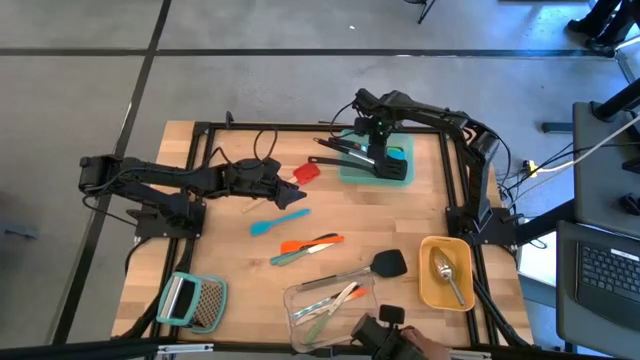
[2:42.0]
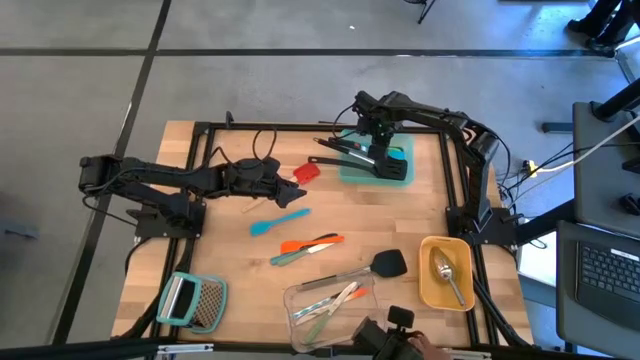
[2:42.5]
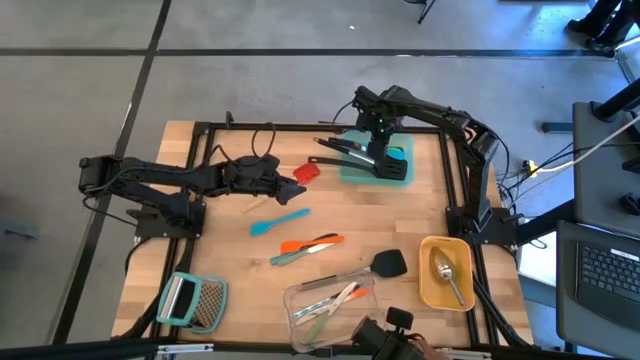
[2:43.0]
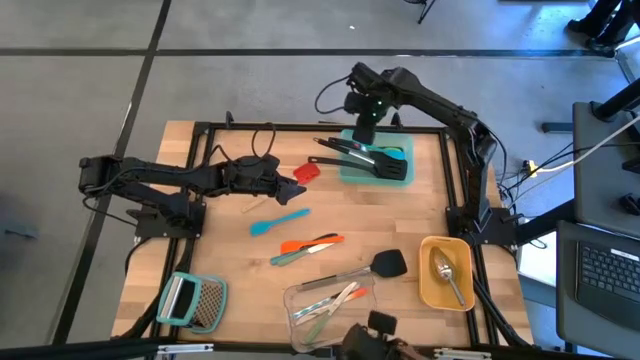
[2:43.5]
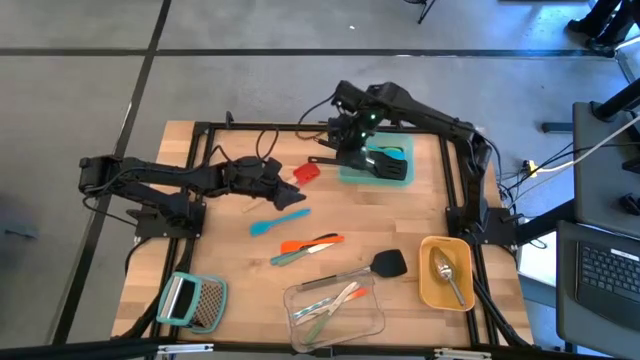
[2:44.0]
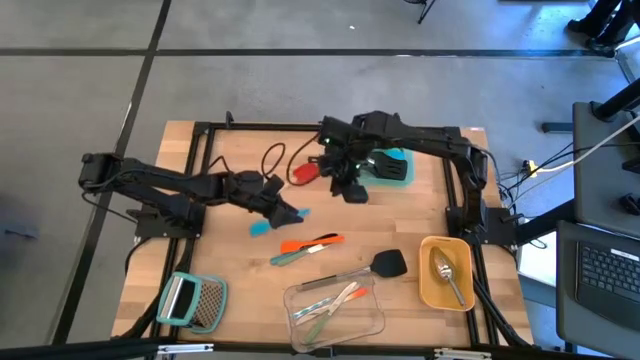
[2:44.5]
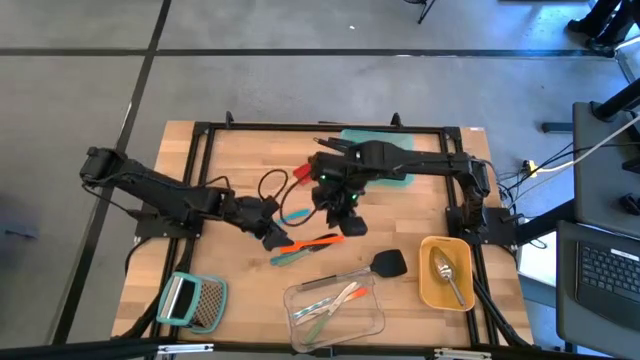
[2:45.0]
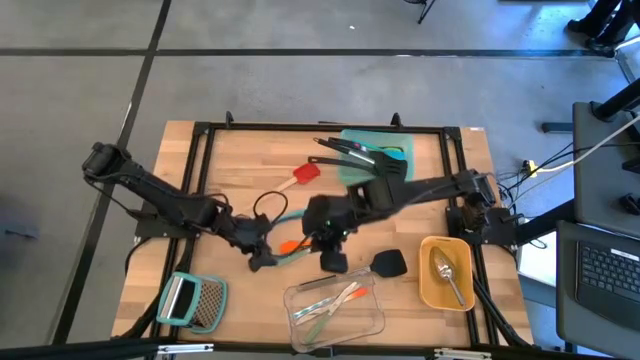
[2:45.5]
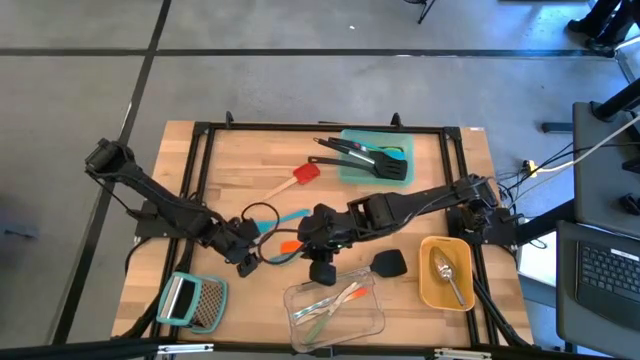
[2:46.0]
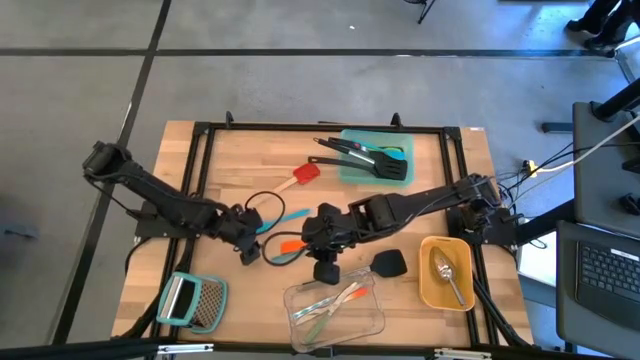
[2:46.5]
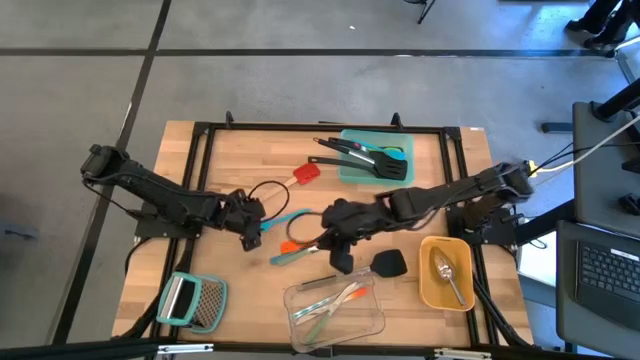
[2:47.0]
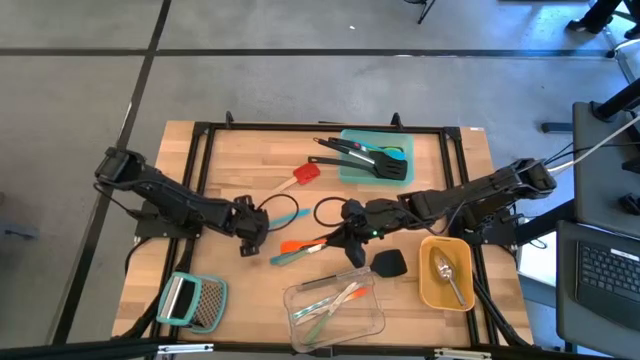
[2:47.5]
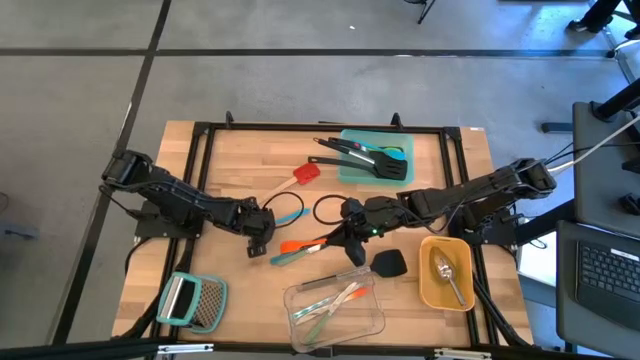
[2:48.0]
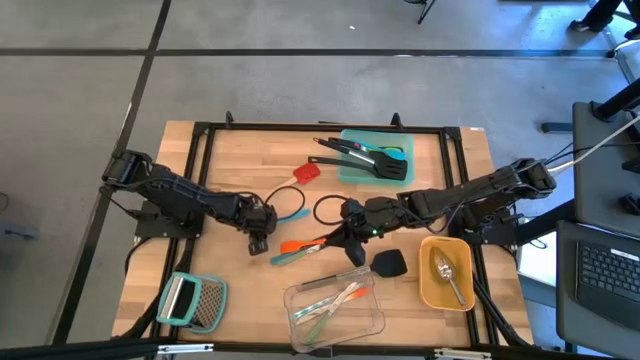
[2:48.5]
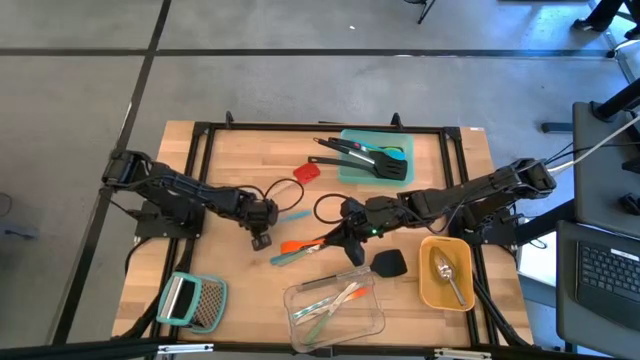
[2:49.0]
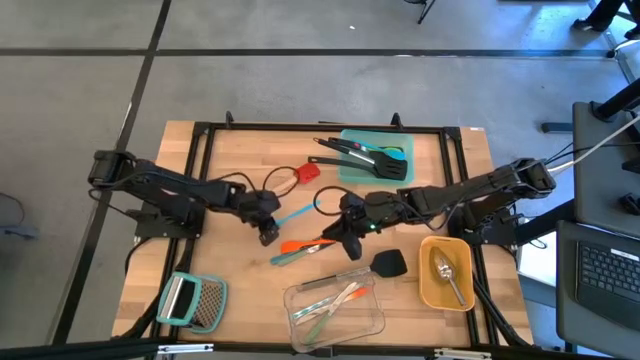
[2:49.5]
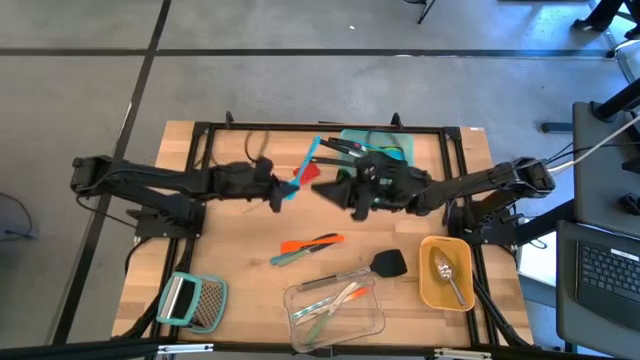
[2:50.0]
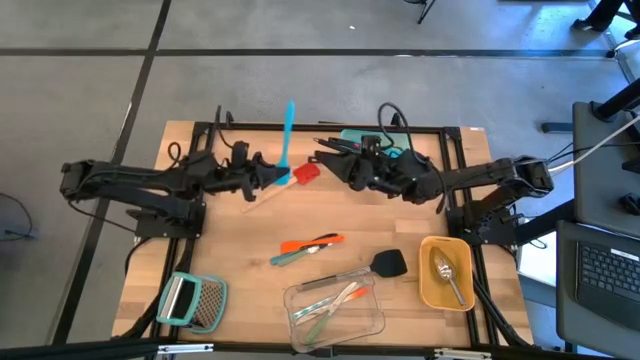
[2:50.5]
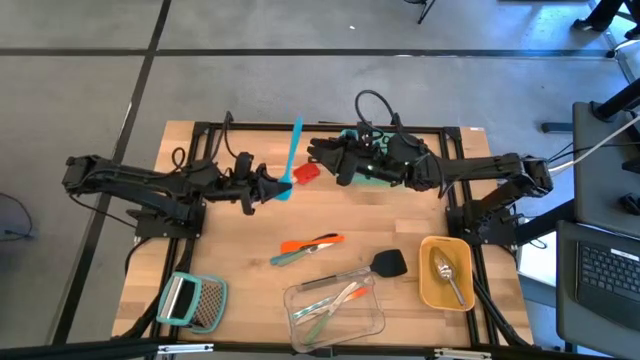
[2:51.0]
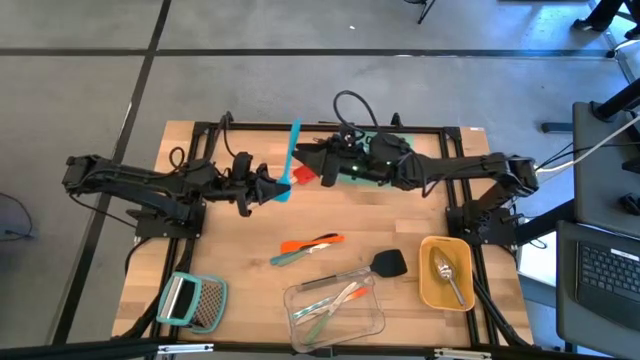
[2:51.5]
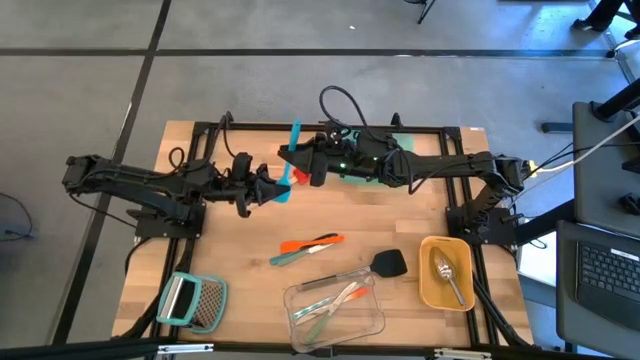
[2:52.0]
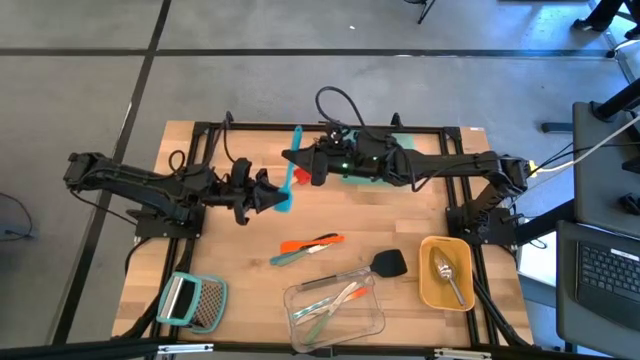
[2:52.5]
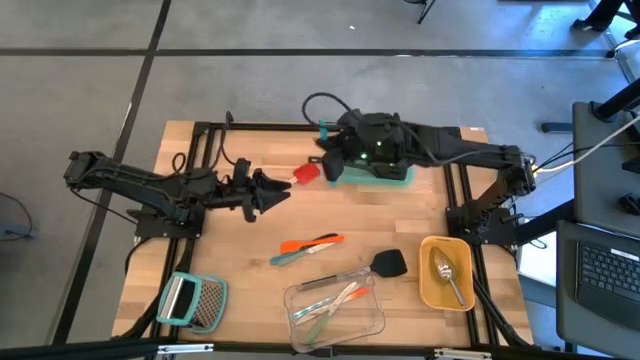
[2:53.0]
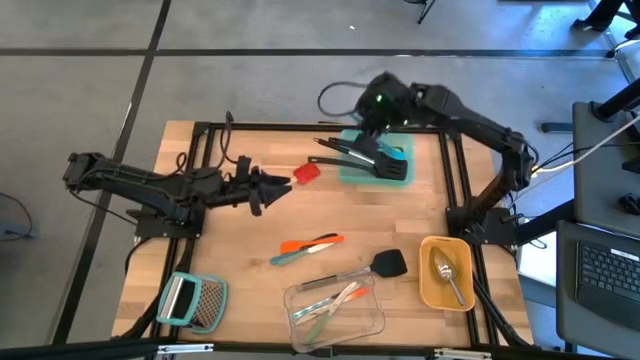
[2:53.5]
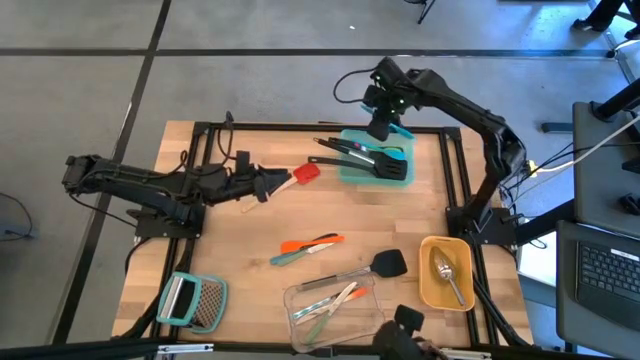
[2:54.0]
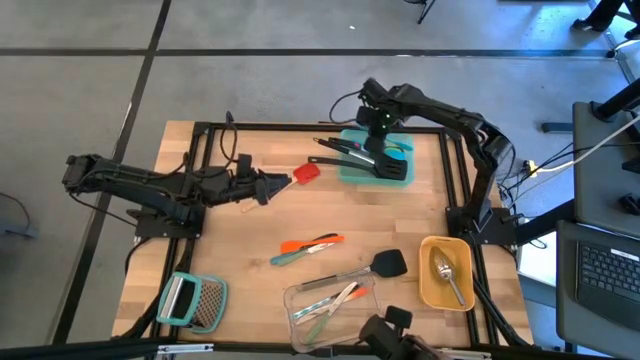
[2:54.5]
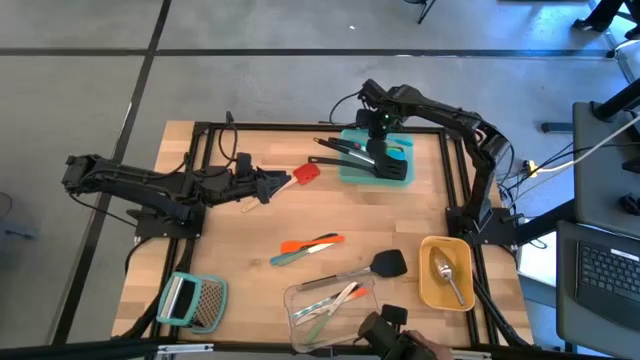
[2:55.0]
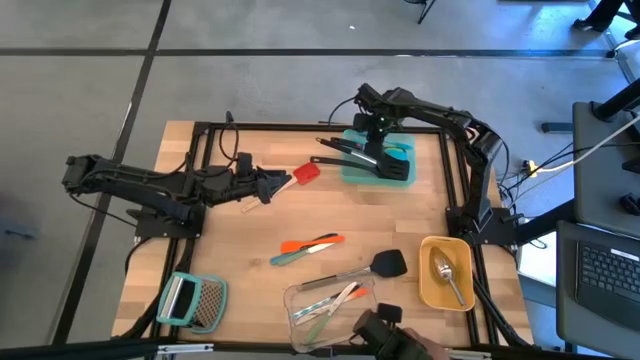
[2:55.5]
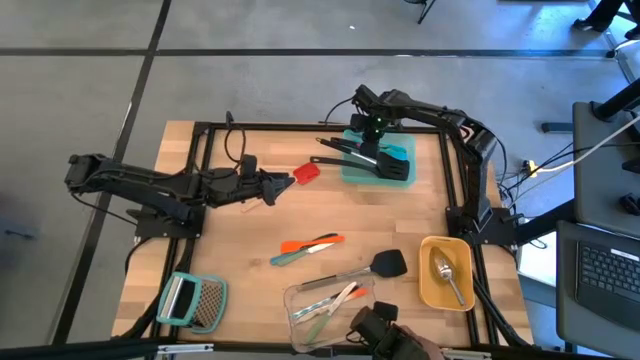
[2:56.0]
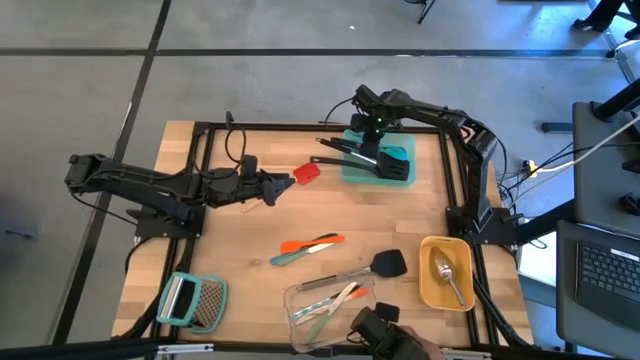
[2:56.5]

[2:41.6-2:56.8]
Task: Pick & Place Kitchen Items
Put the blue spatula into the yellow bin

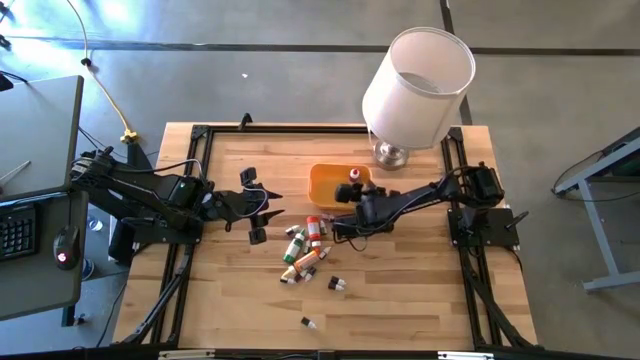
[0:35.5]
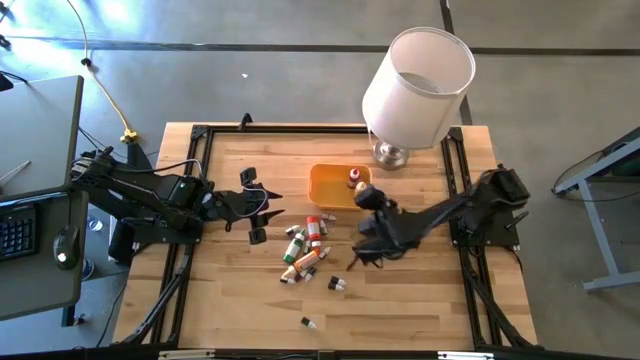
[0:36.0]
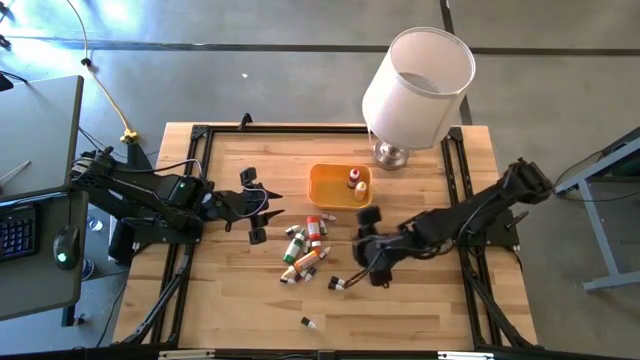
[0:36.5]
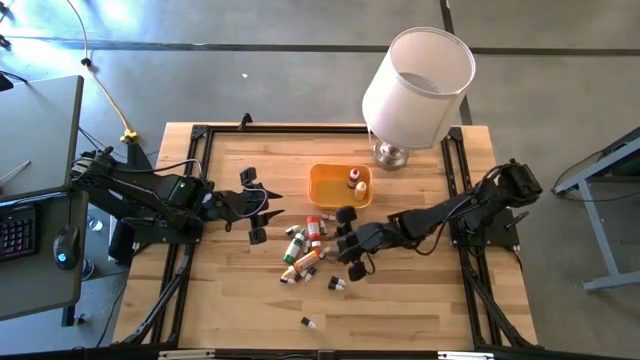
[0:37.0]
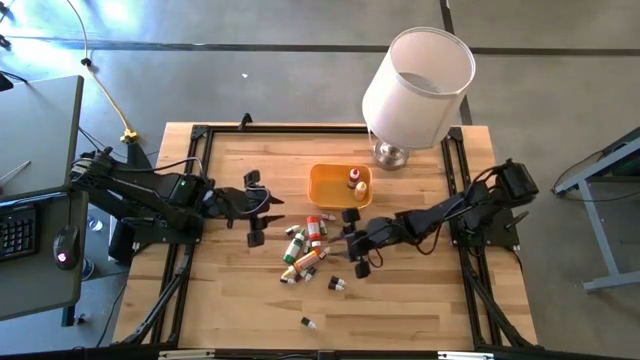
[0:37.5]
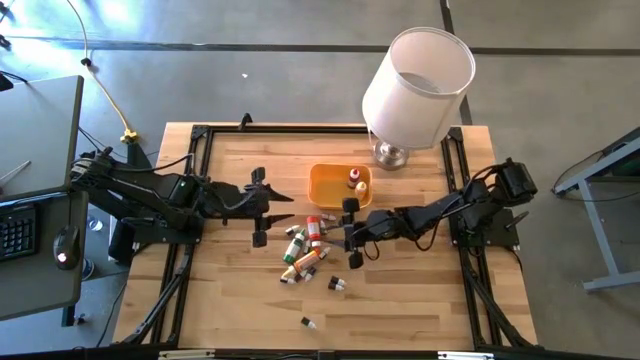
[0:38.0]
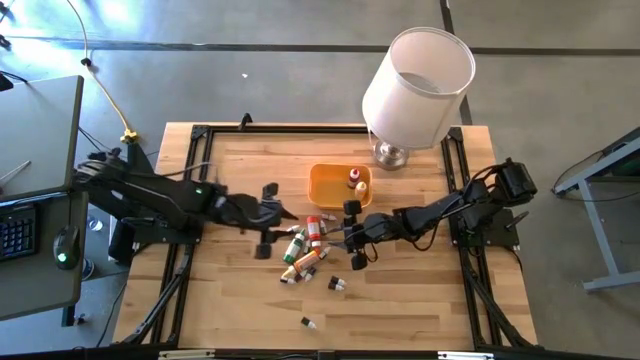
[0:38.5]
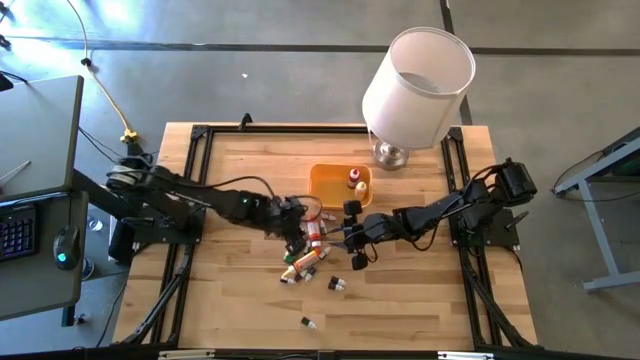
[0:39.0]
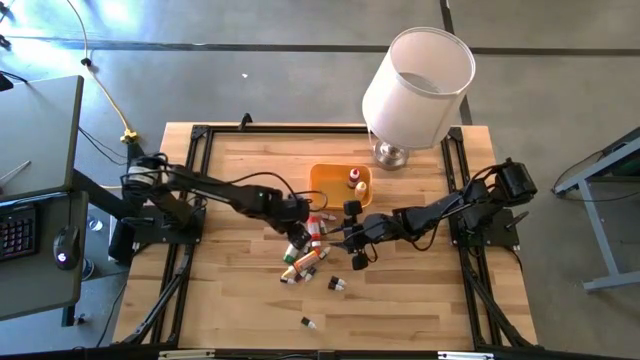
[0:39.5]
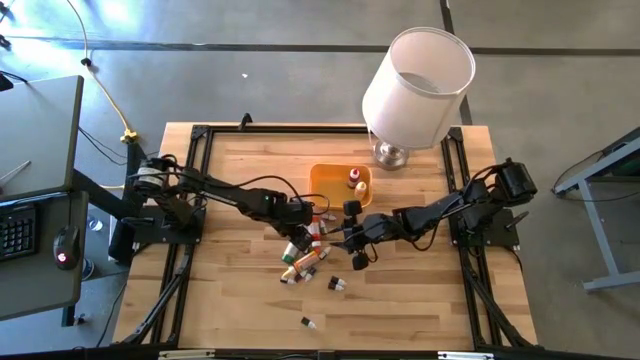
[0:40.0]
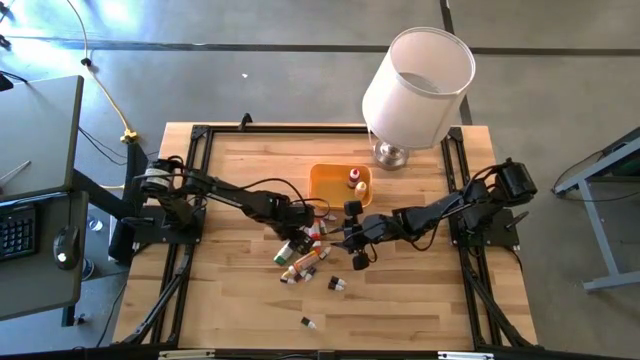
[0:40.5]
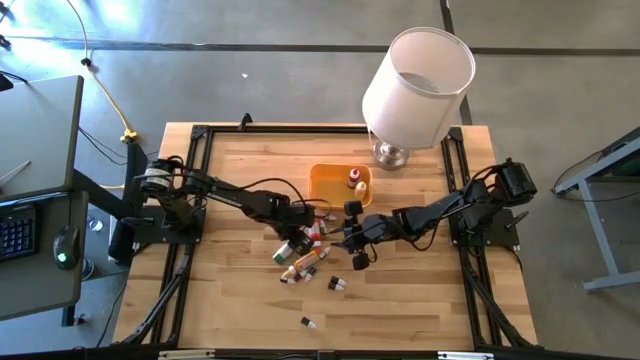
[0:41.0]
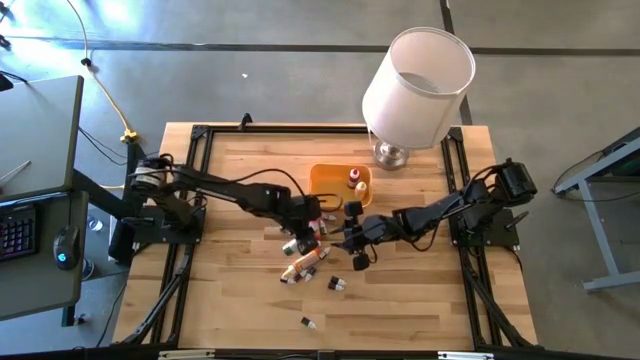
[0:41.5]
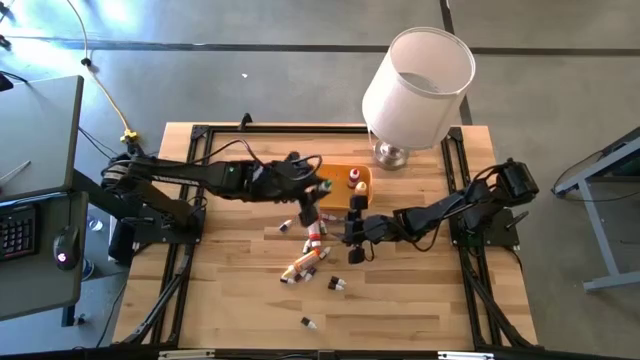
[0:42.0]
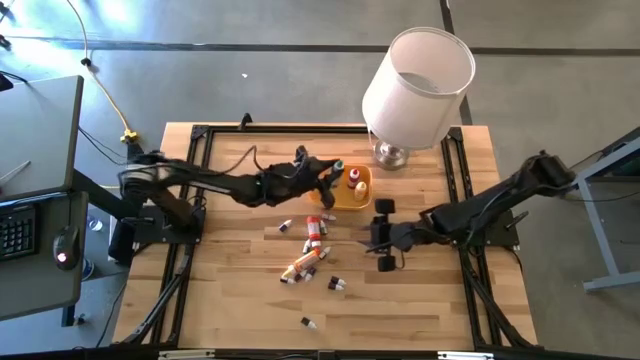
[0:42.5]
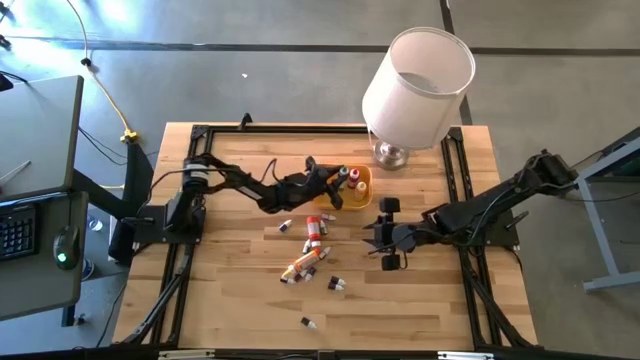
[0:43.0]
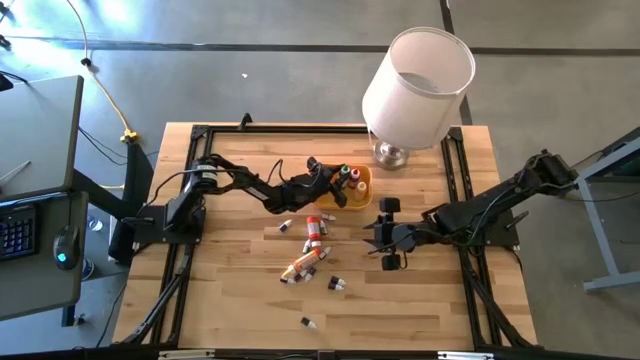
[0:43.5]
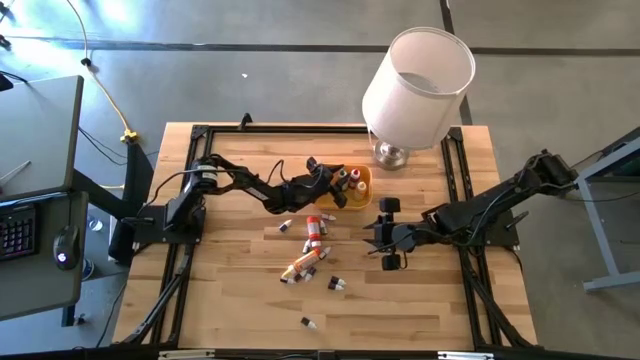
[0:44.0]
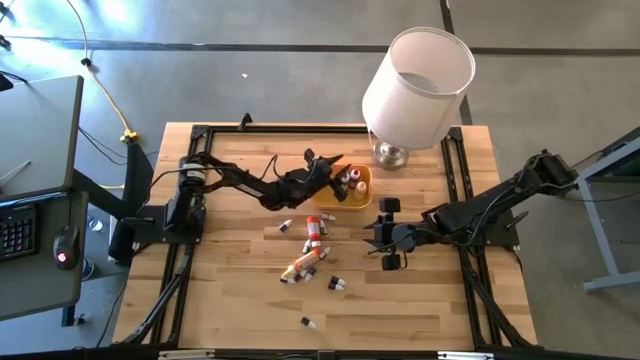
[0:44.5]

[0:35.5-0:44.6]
Task: Pick & Place food coloring
Put the large green food coloring bottle into the yellow container
